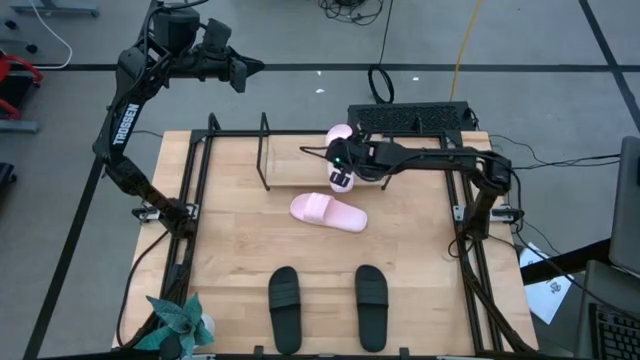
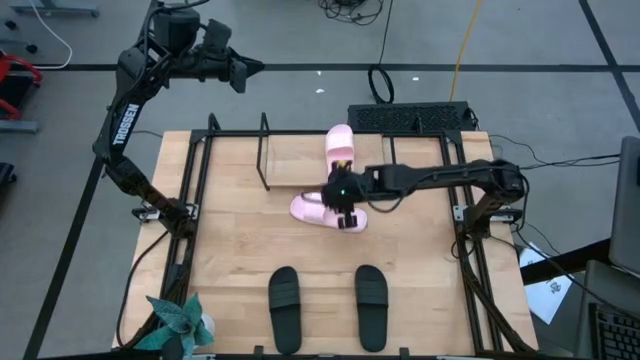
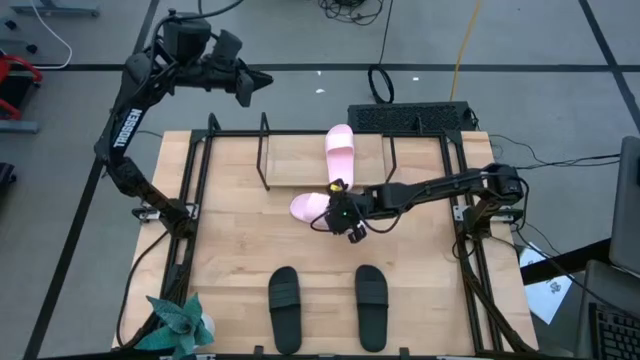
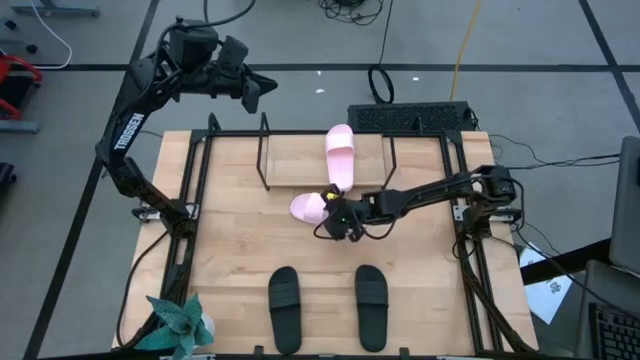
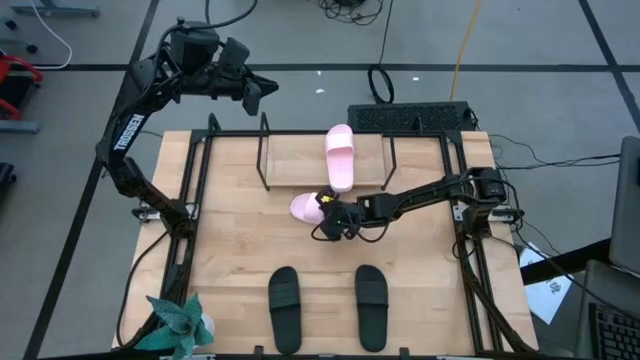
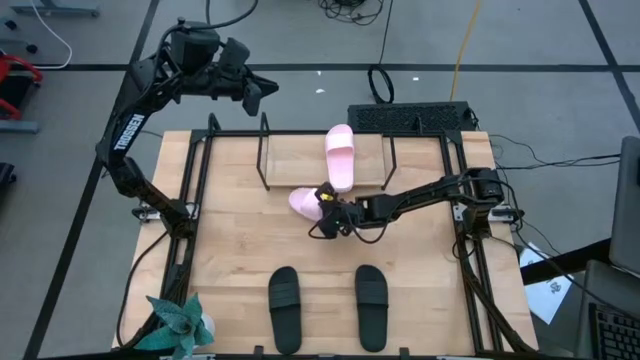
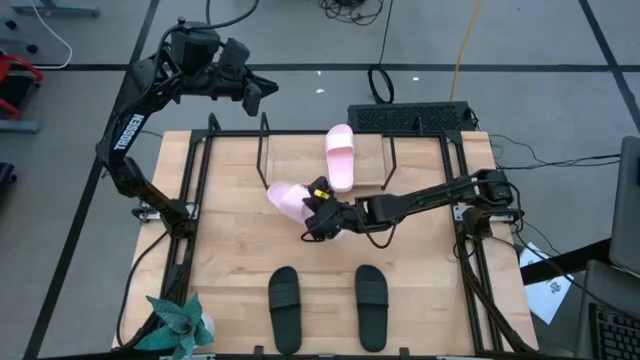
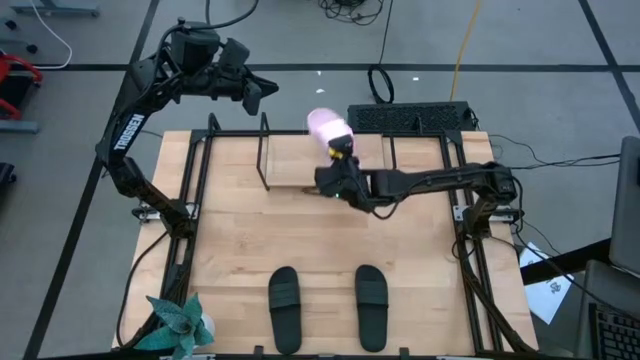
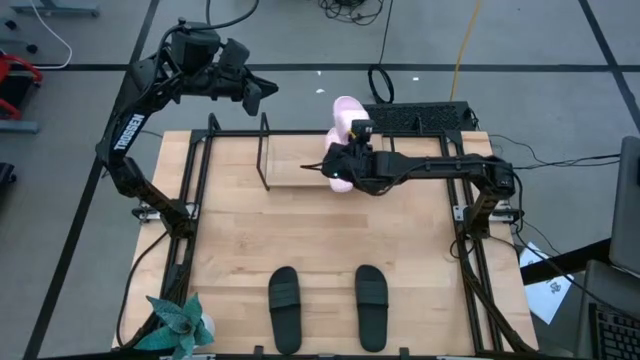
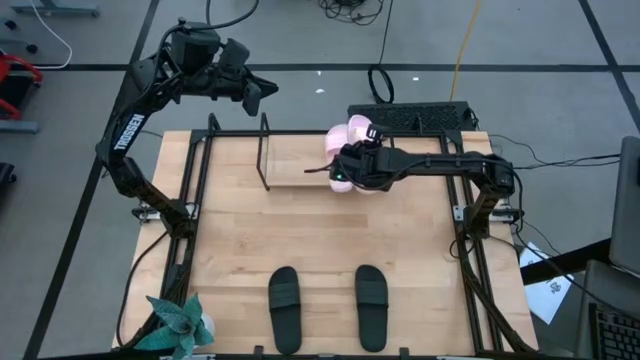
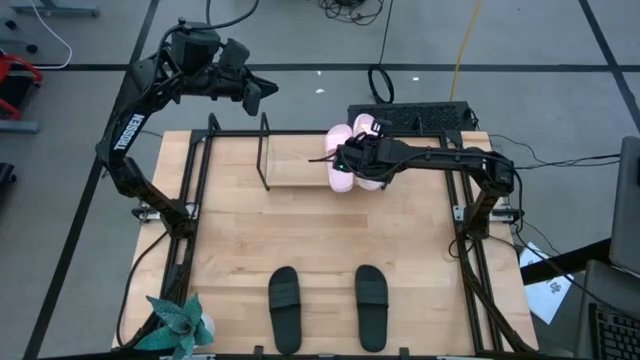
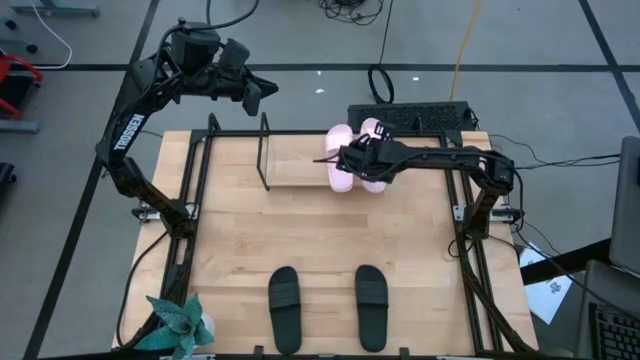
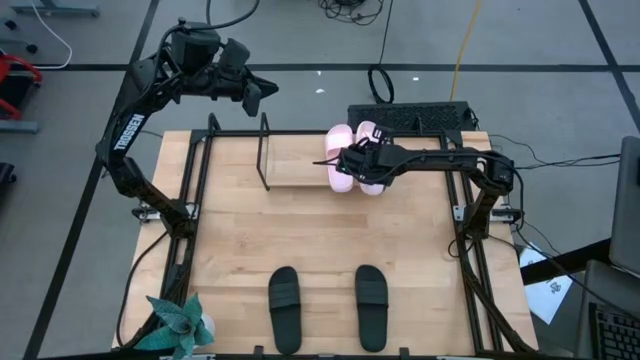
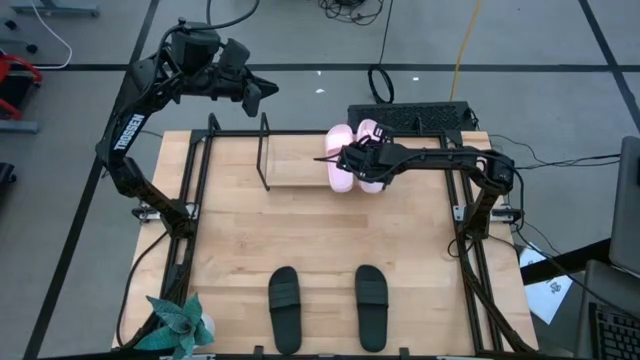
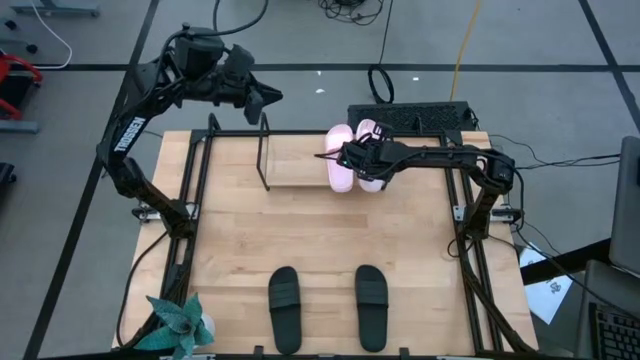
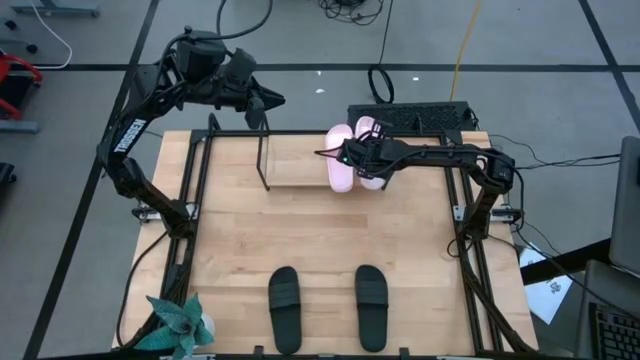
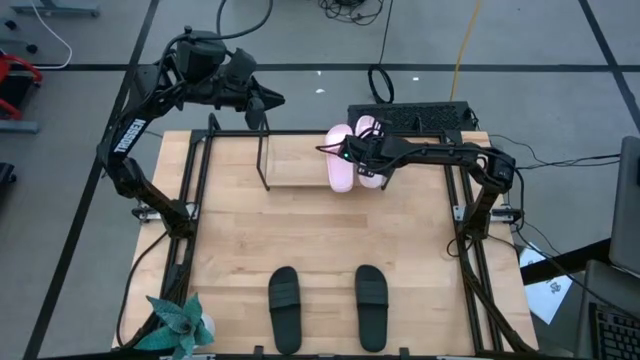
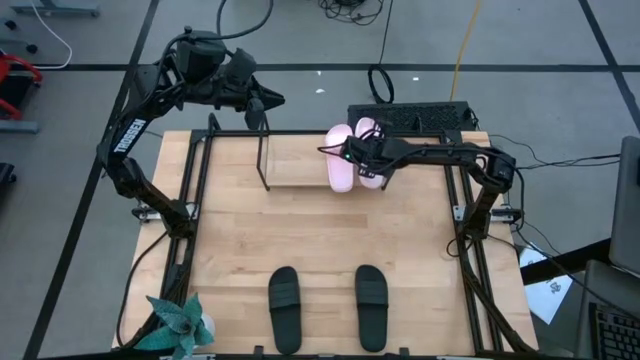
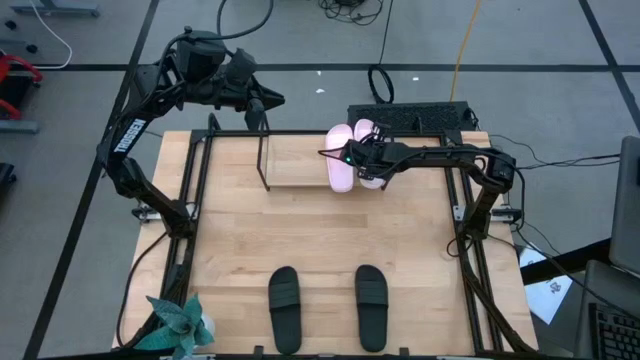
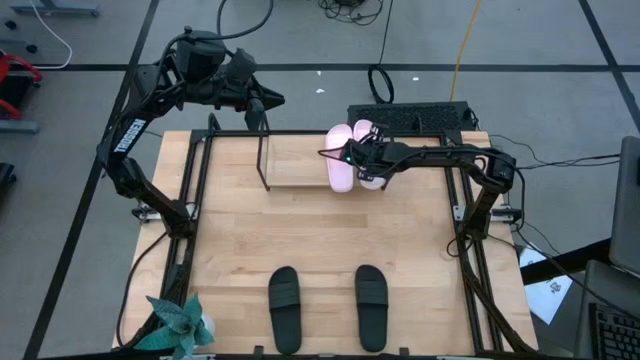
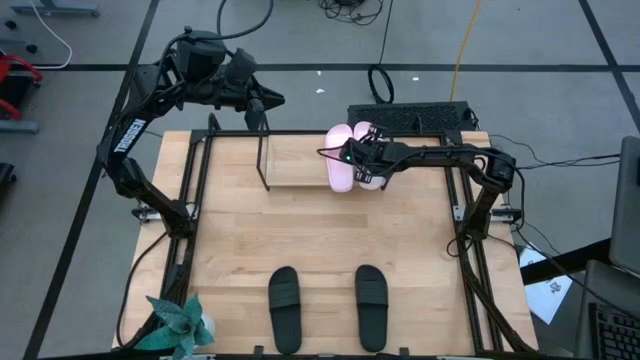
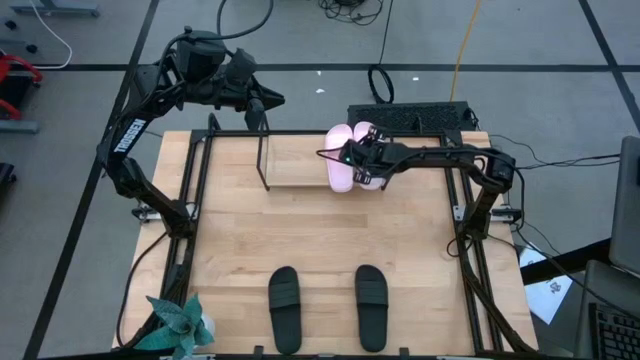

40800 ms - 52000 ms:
Task: Pick and place slides into the shelf
Put the pink slide on the shelf

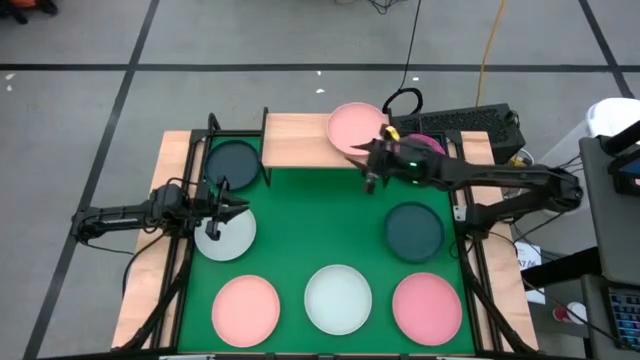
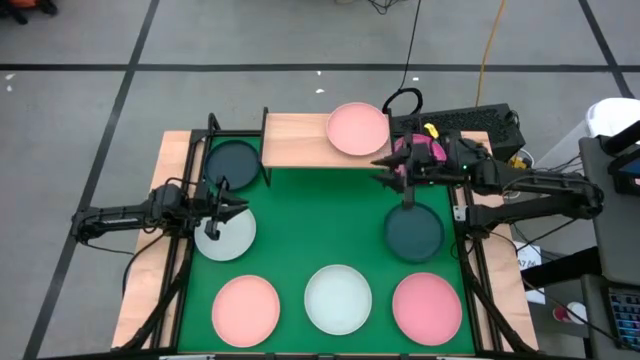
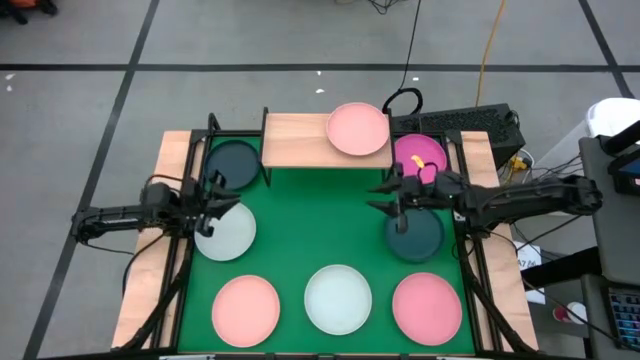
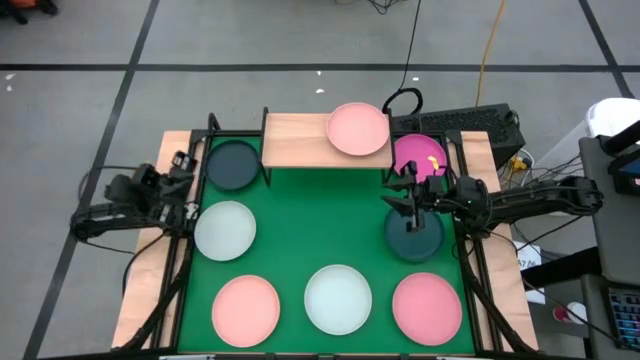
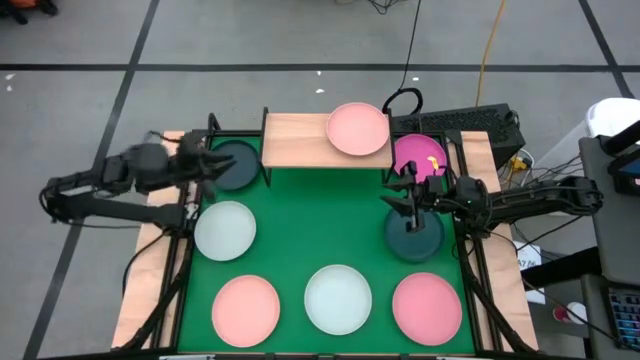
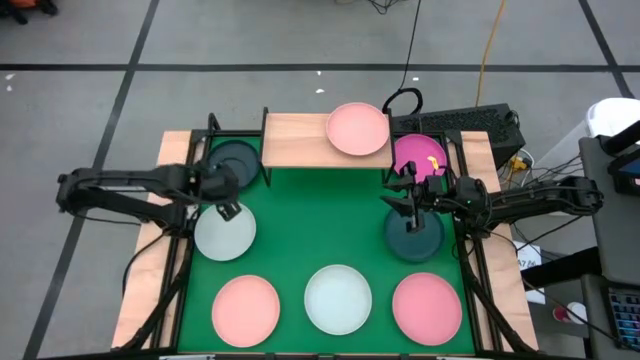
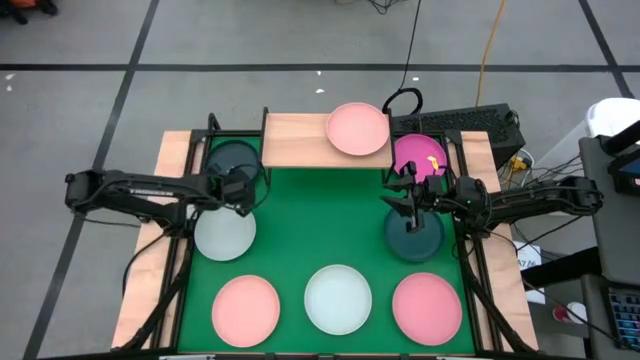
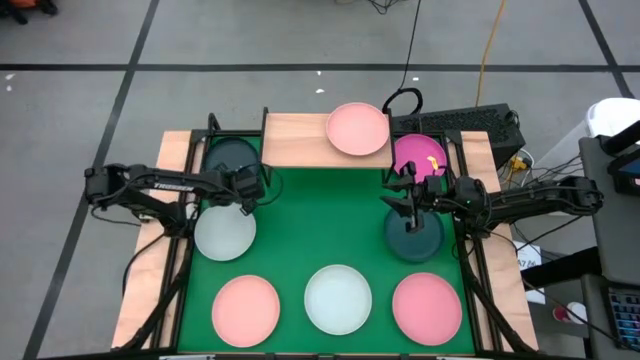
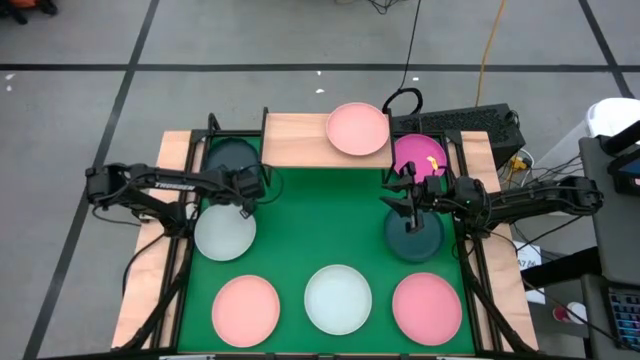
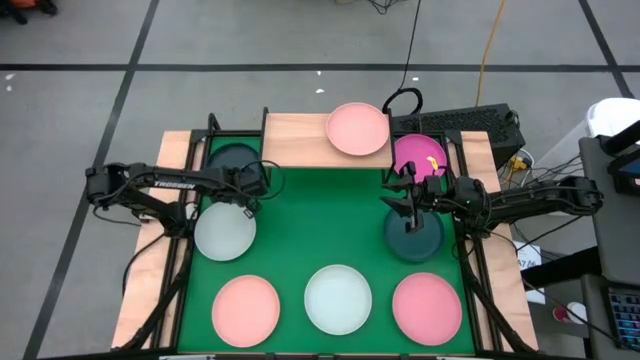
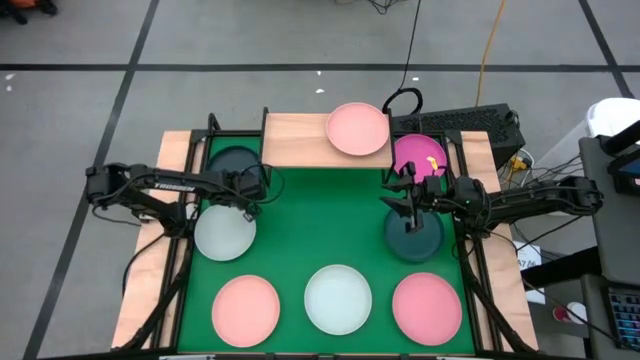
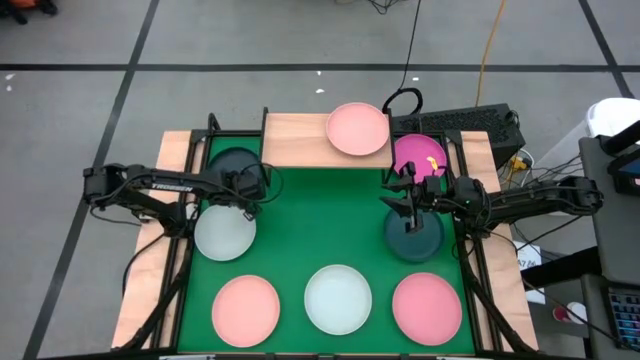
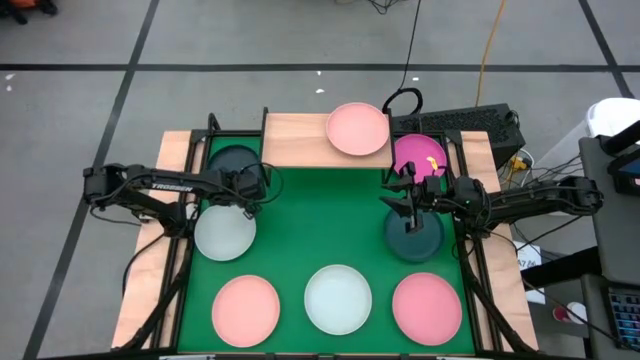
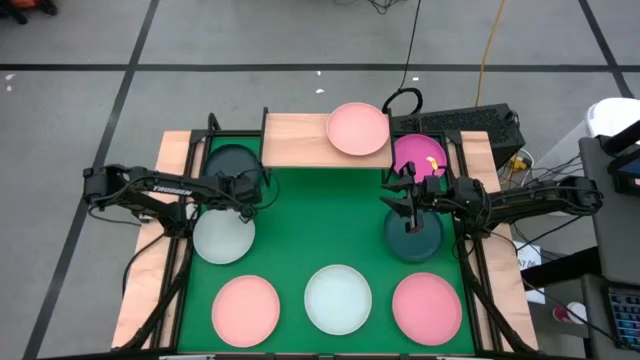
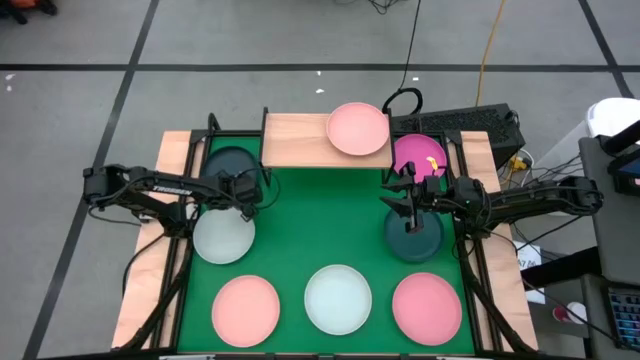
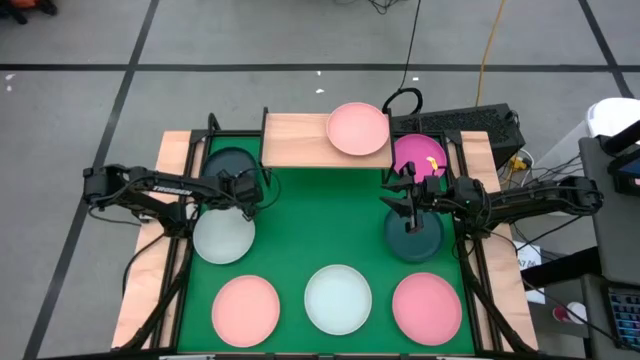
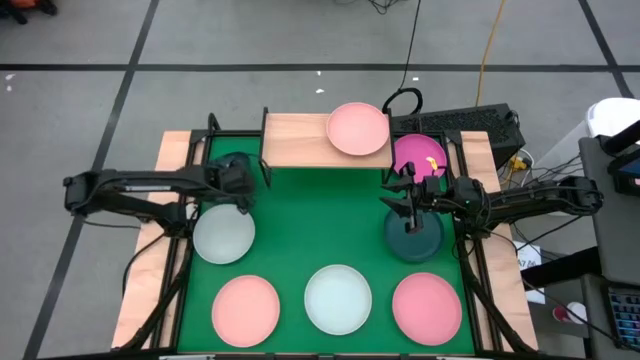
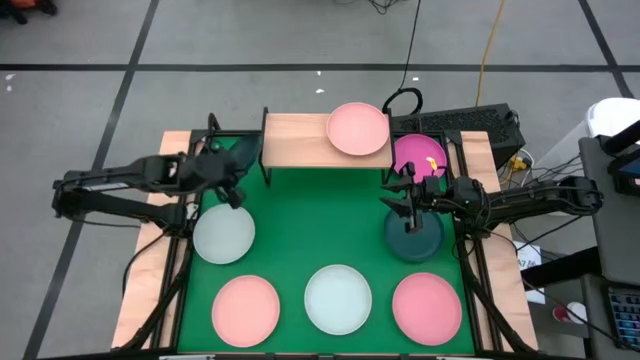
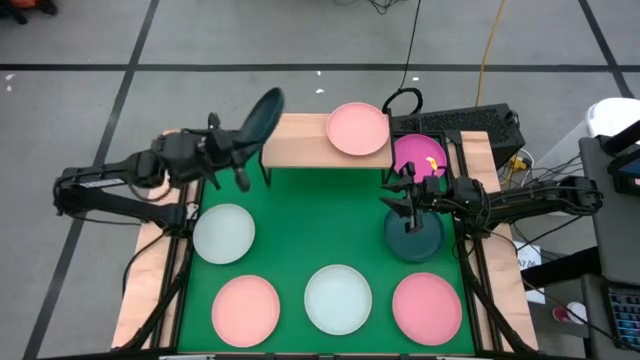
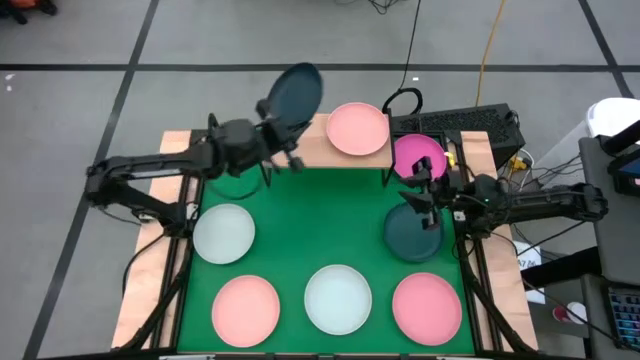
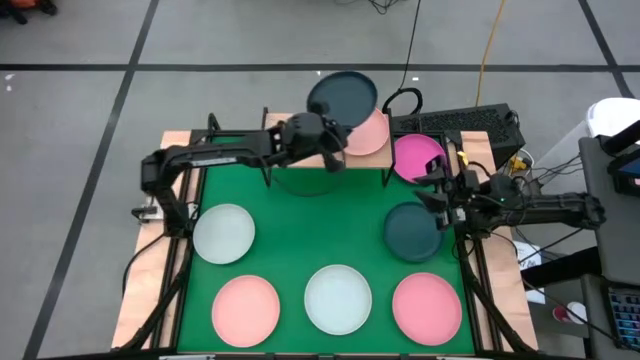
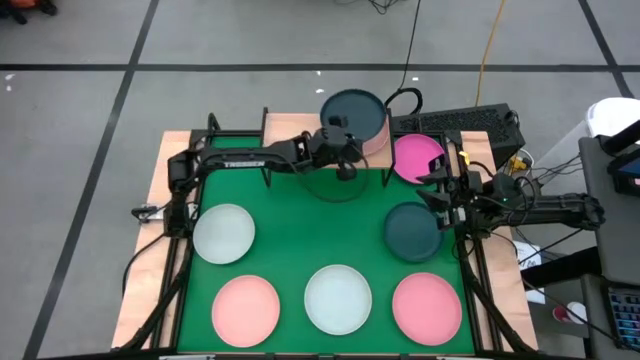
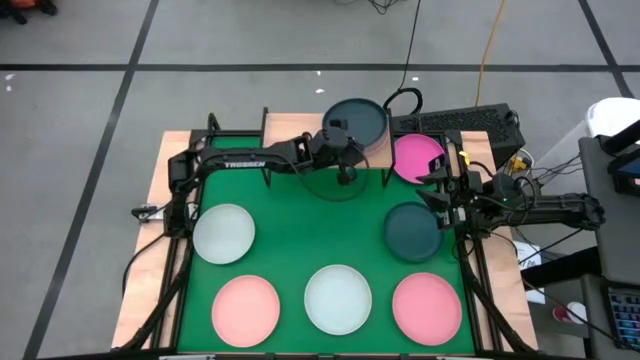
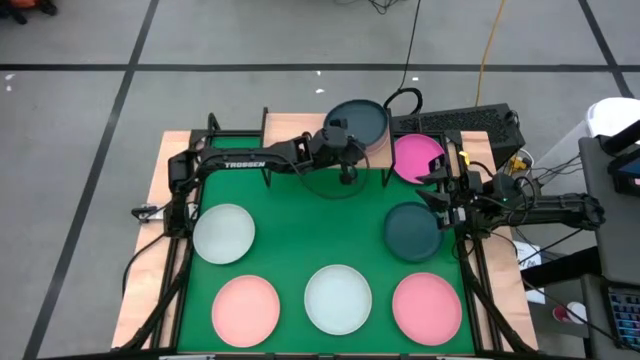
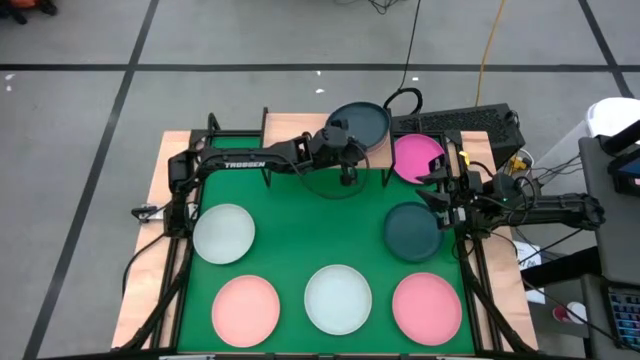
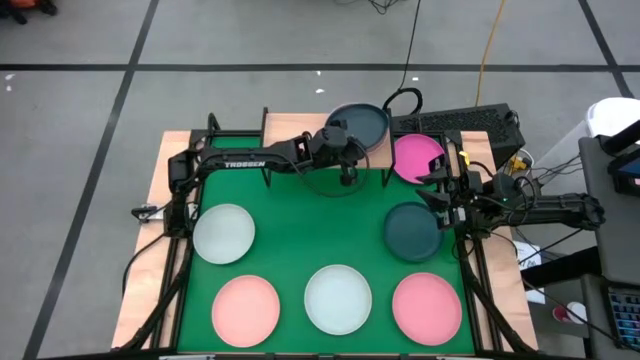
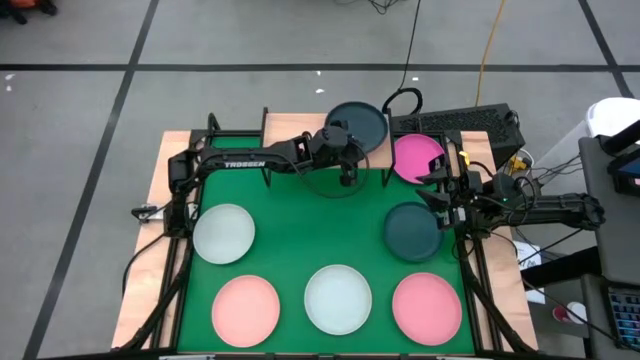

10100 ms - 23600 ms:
Task: Place and stack plates onto a shelf
Stack the black plate on top of the light orange plate
